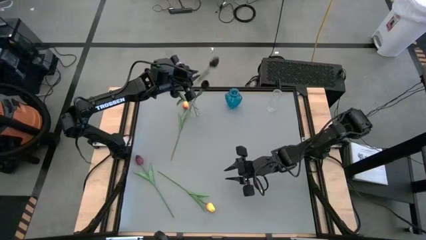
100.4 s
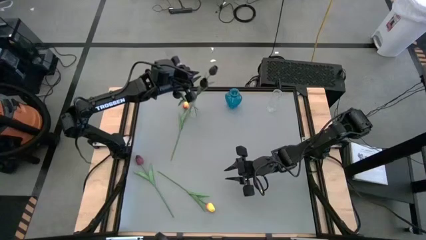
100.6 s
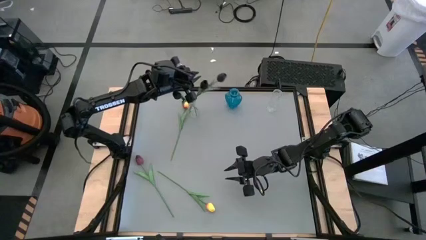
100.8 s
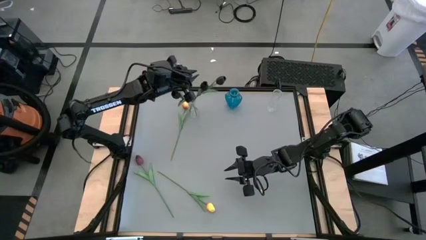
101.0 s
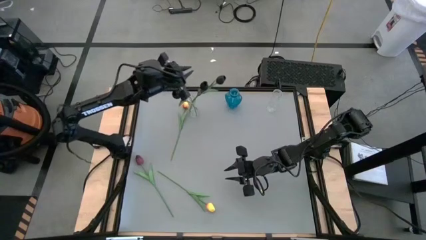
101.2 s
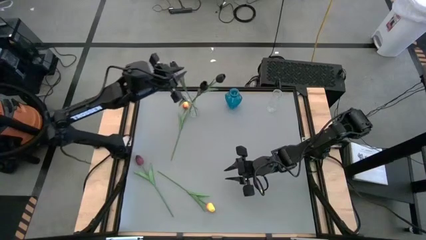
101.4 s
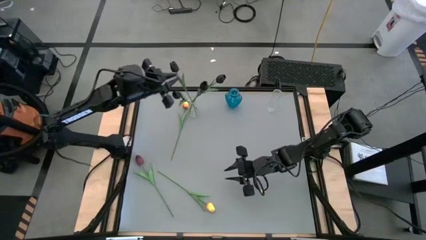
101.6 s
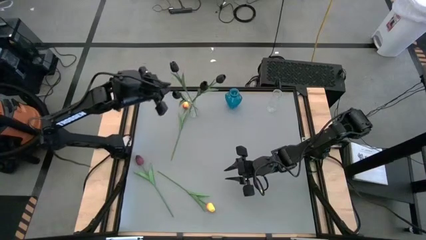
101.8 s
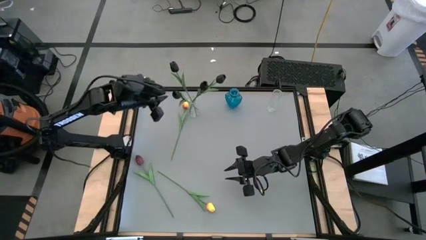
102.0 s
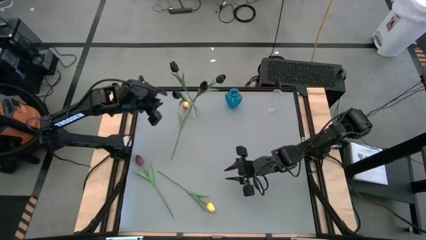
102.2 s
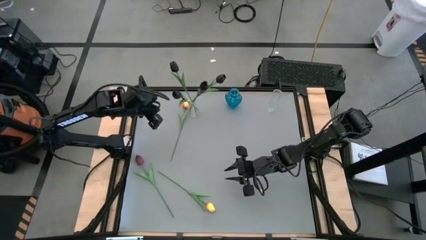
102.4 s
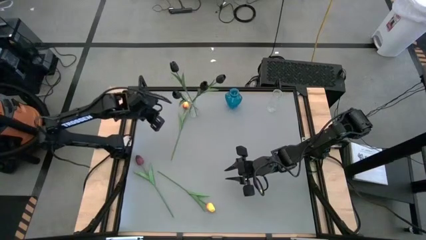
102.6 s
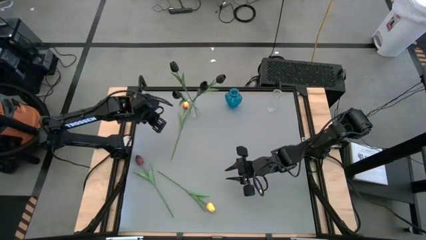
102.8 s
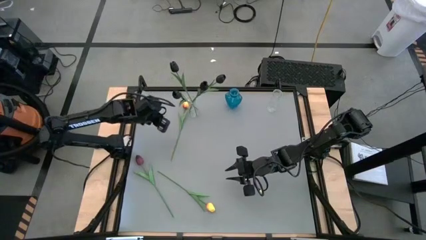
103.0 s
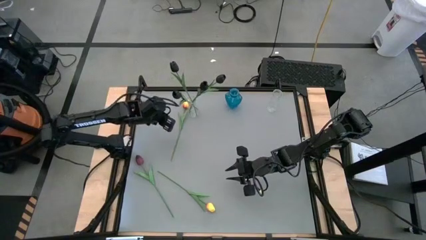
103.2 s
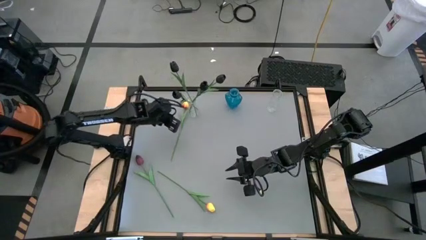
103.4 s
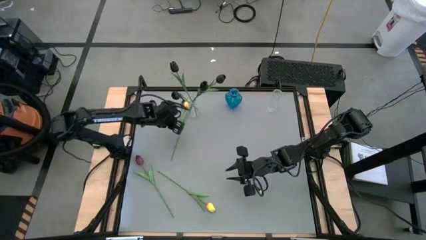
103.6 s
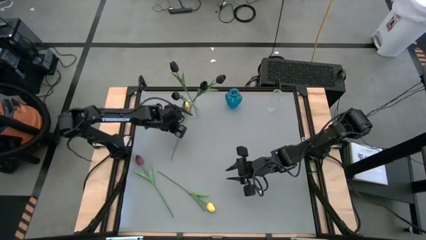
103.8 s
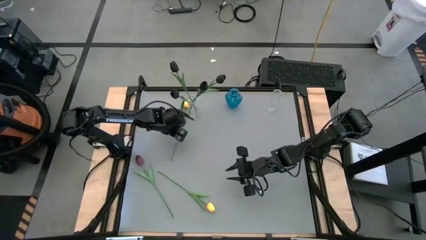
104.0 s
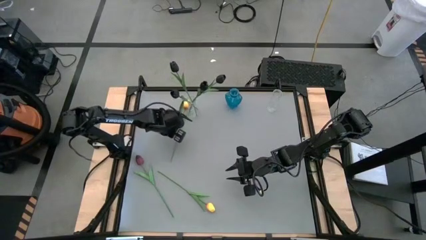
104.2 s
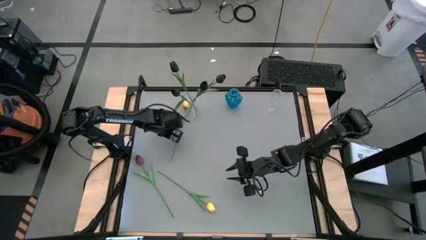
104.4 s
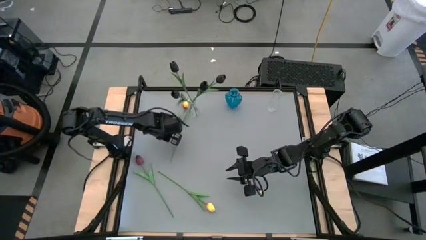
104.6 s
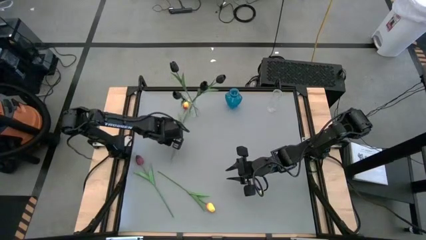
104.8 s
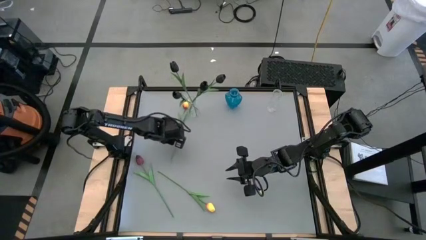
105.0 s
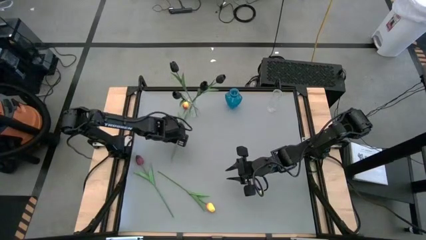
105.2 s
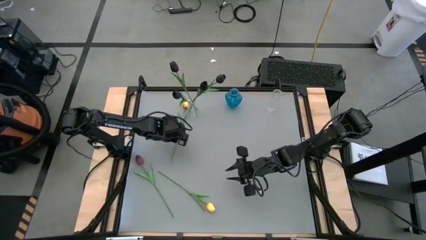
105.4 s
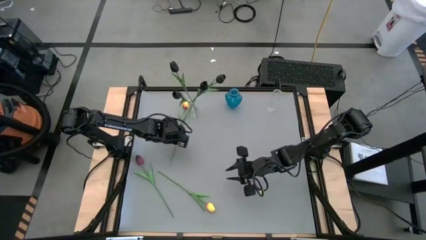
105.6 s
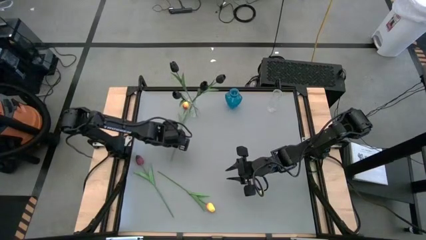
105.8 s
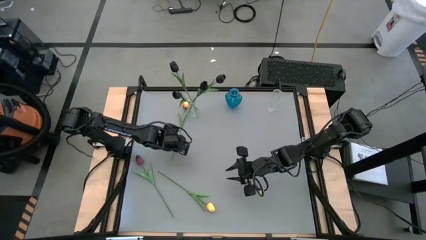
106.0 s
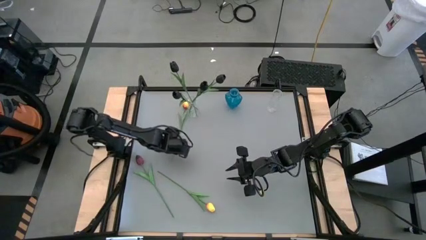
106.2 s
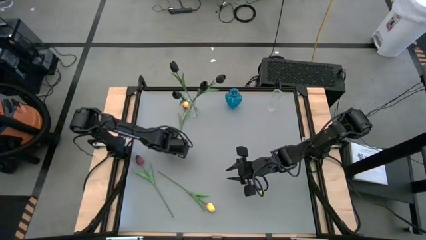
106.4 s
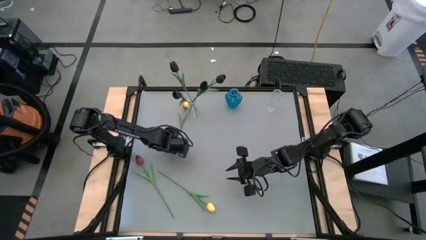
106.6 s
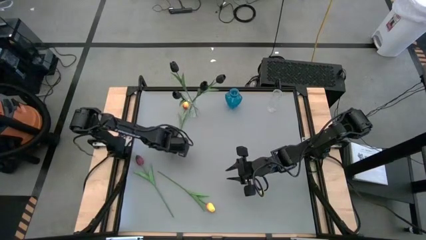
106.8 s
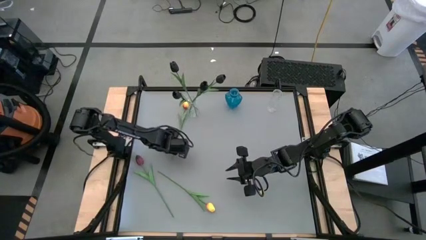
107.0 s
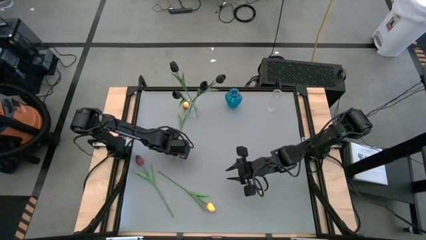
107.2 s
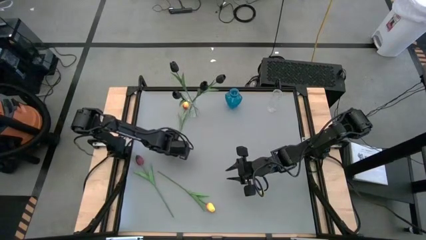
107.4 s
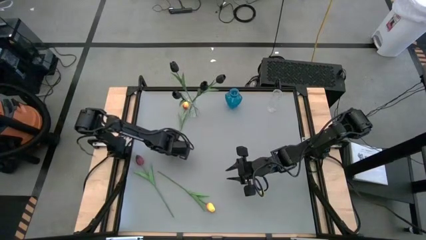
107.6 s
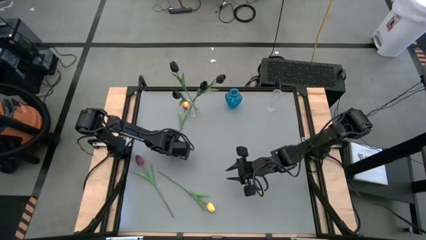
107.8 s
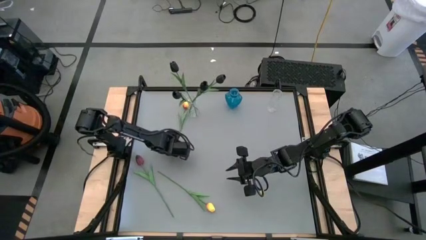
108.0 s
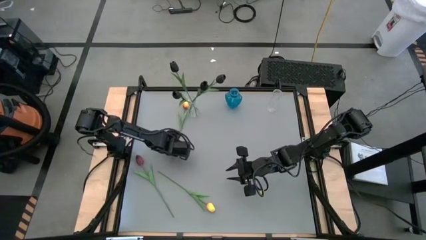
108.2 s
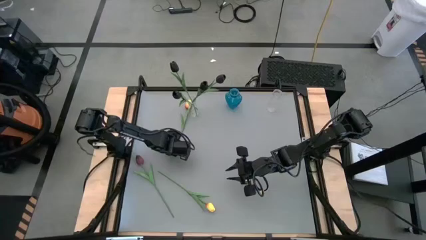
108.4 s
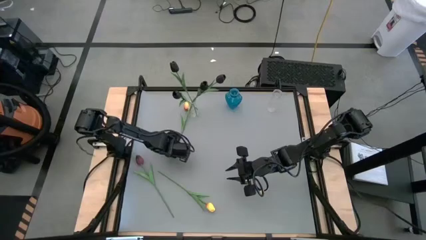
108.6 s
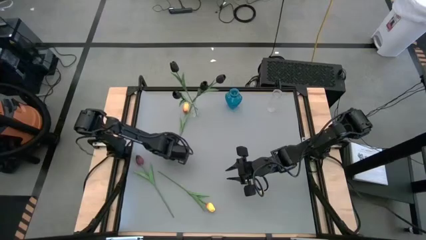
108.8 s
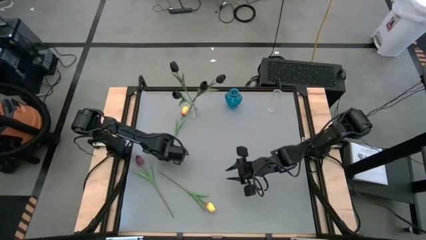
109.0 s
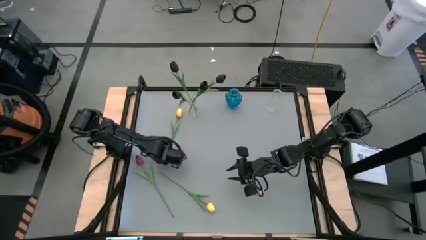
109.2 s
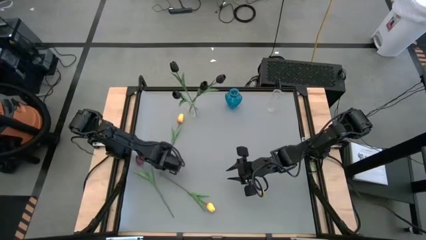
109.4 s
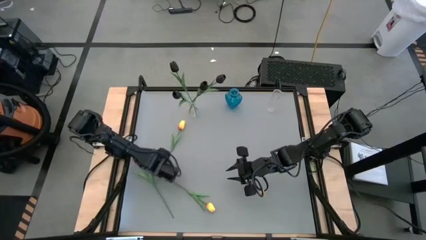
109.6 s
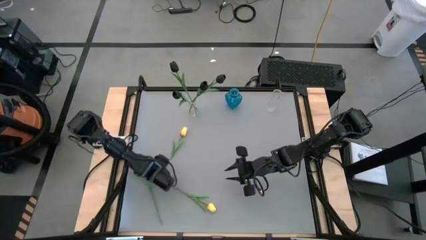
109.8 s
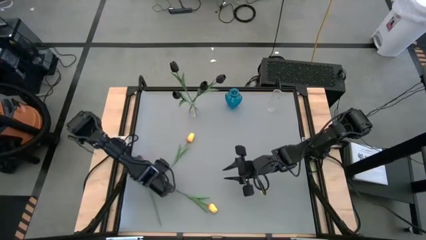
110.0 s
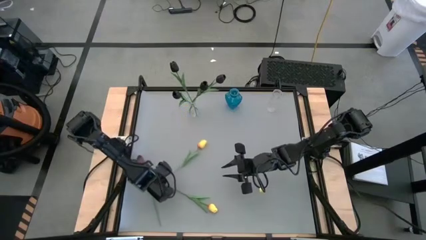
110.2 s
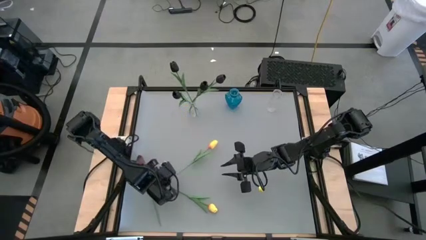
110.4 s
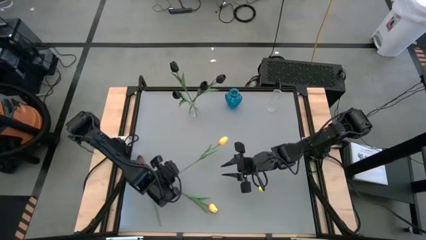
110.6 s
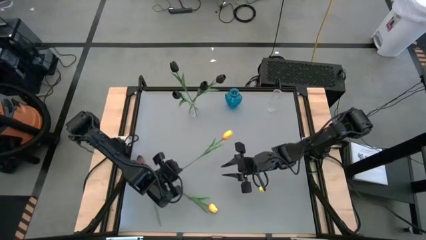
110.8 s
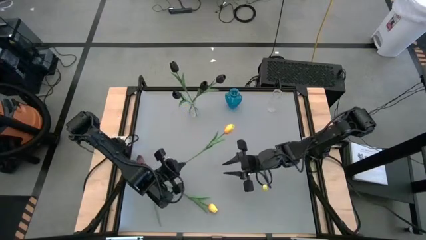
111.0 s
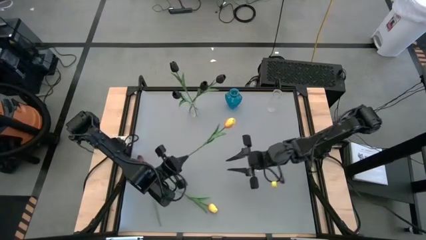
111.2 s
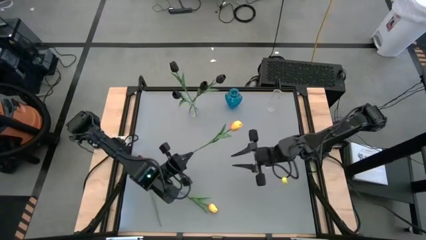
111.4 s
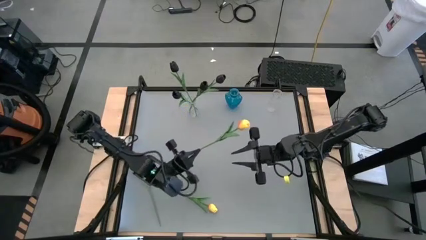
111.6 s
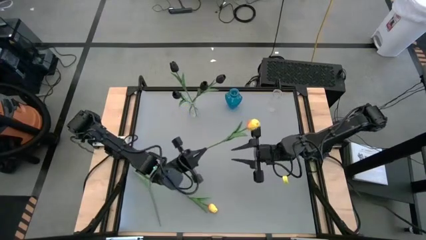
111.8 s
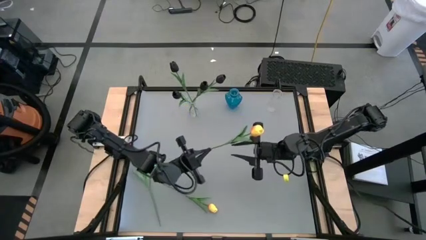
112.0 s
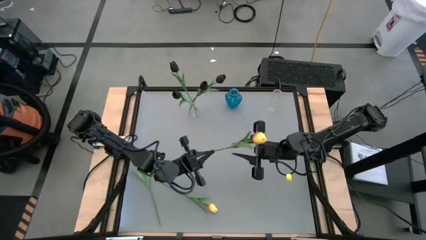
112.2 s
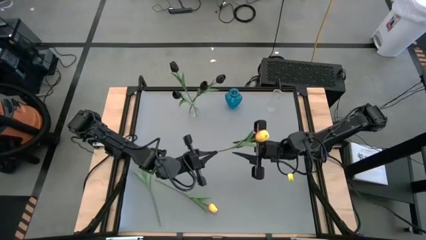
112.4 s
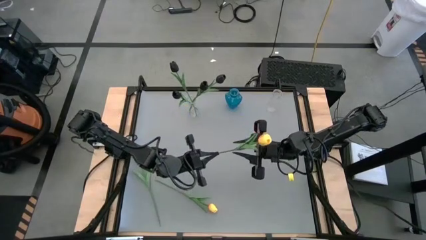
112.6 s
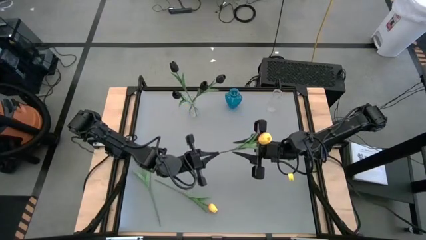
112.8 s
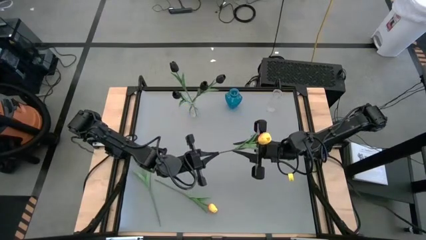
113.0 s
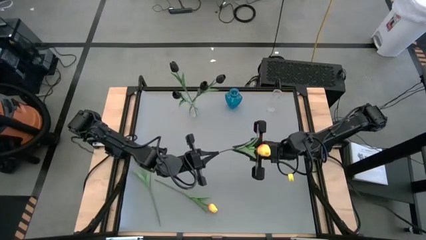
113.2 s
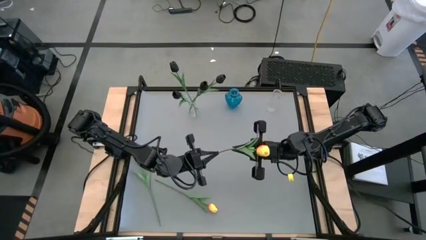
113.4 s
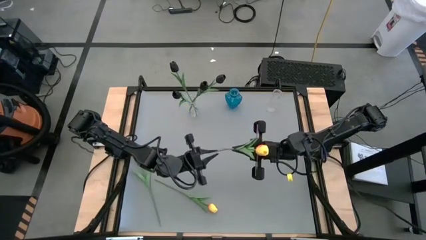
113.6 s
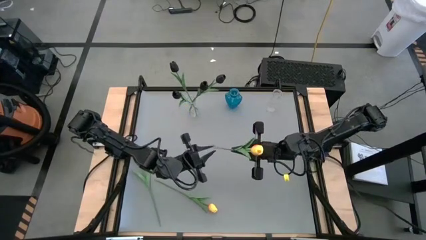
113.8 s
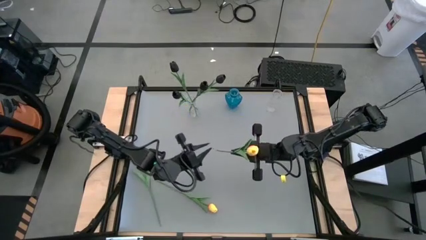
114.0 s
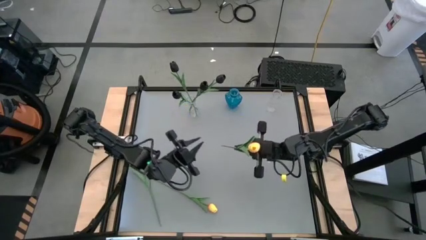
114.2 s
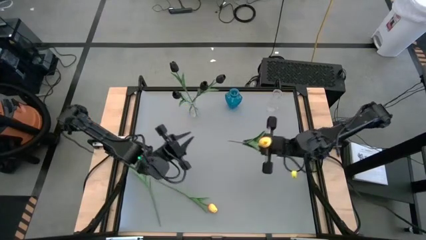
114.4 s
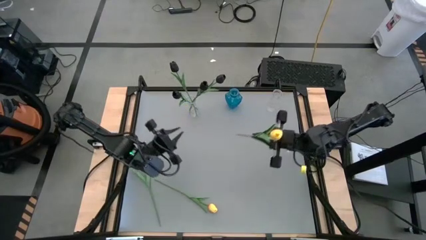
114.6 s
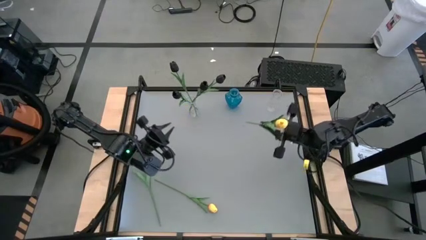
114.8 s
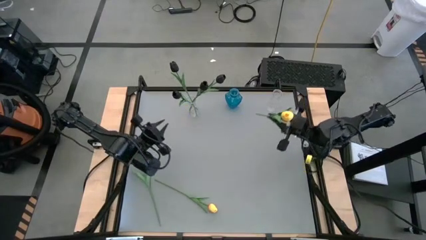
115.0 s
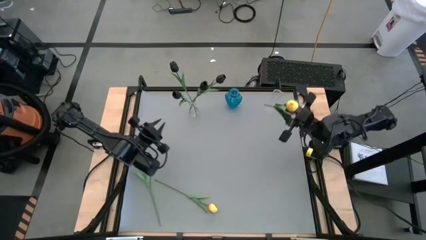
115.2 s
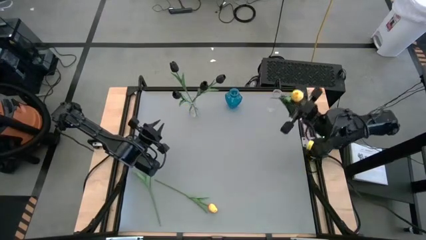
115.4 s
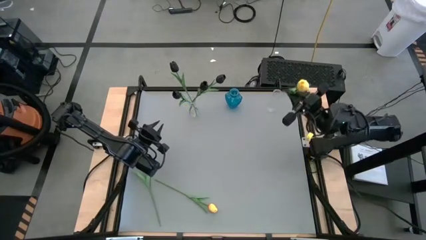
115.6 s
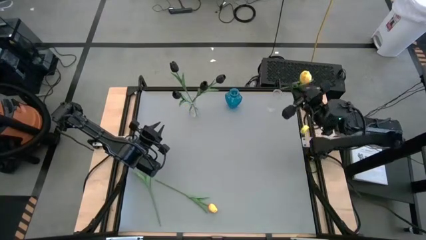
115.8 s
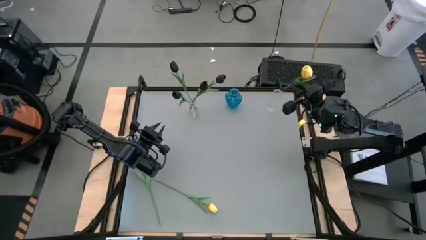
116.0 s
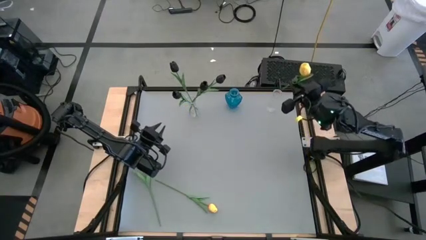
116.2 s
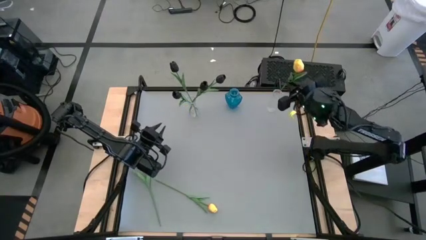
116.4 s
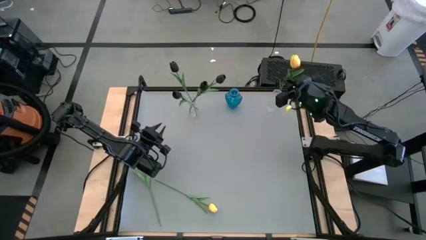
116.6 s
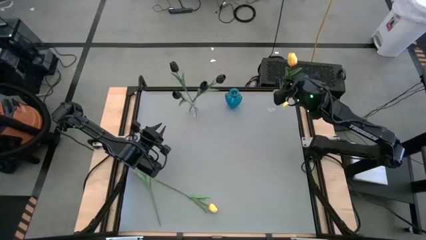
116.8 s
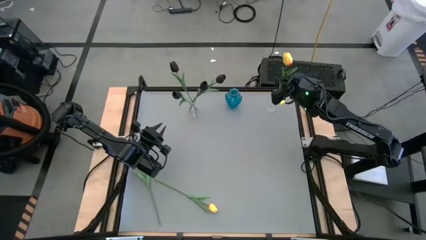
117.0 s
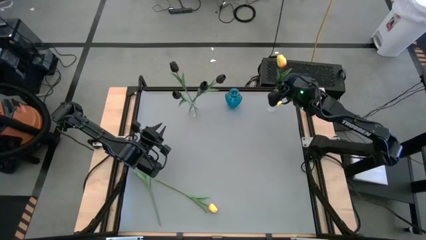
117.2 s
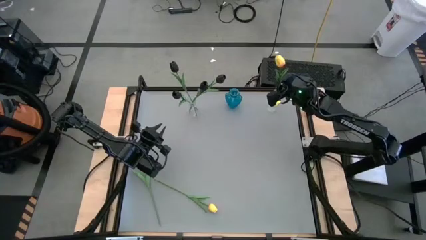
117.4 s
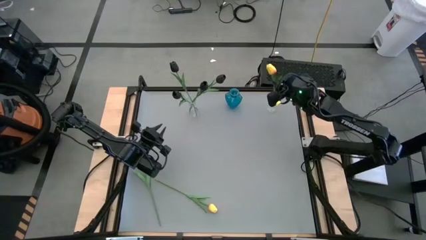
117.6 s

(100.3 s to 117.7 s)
Task: Sort flowers into vase by color
Put the yellow flower into the right transparent flower vase
